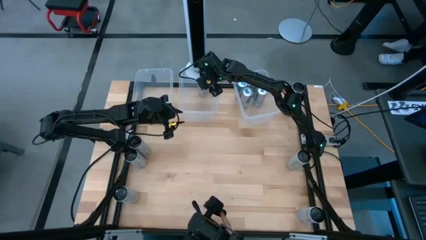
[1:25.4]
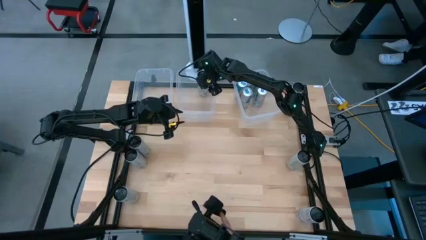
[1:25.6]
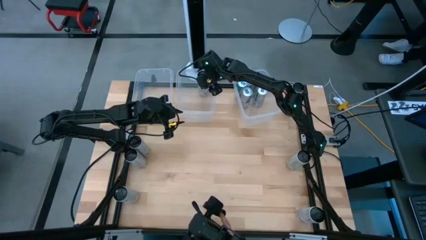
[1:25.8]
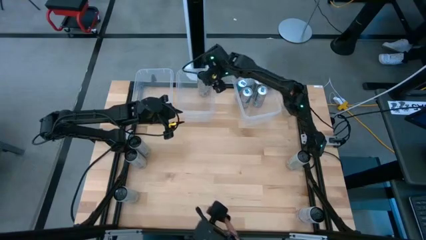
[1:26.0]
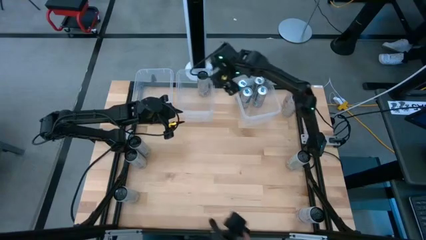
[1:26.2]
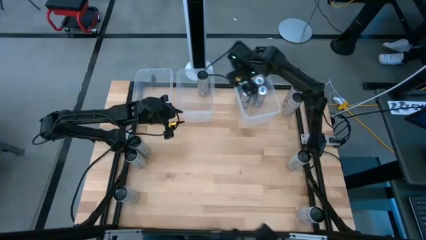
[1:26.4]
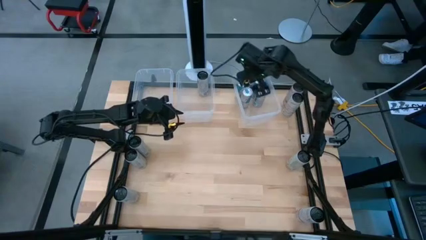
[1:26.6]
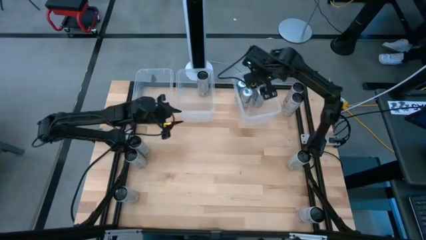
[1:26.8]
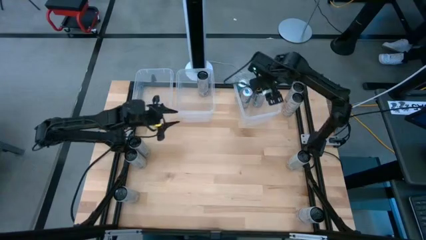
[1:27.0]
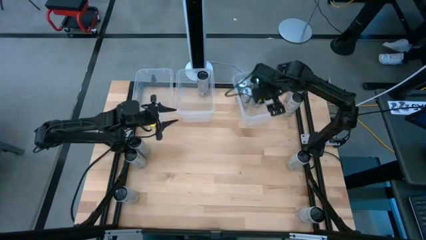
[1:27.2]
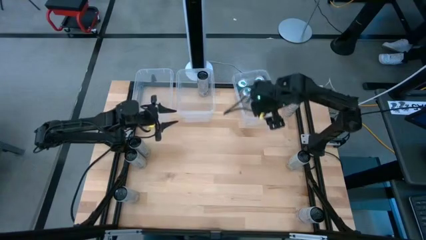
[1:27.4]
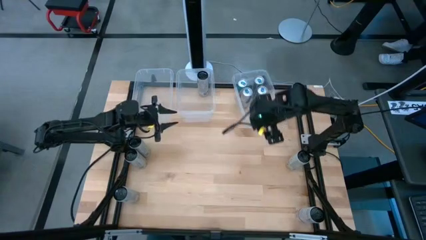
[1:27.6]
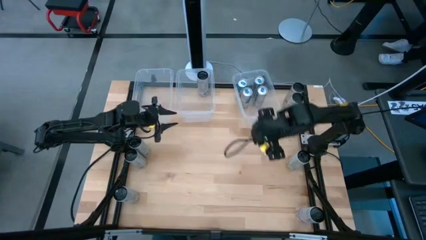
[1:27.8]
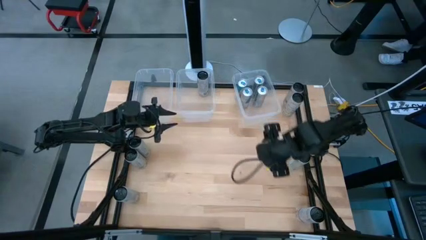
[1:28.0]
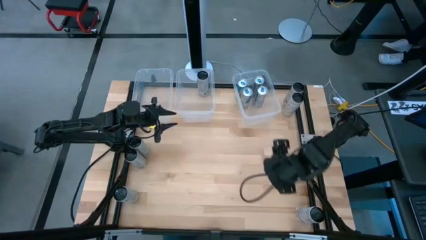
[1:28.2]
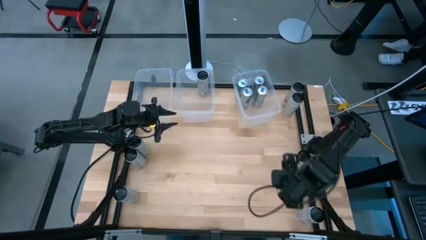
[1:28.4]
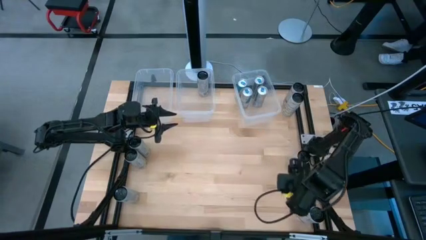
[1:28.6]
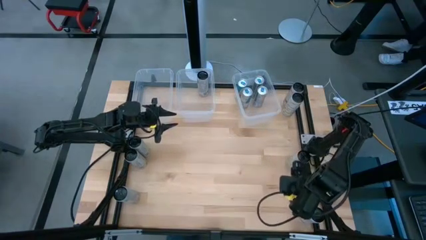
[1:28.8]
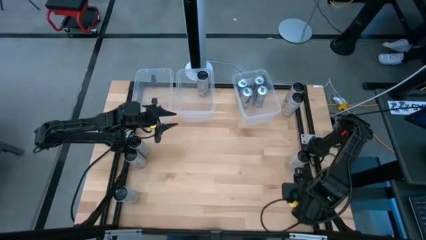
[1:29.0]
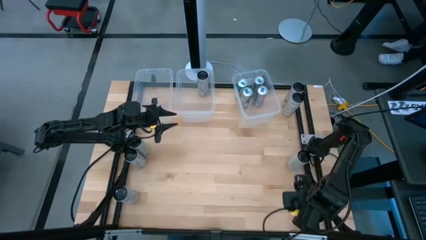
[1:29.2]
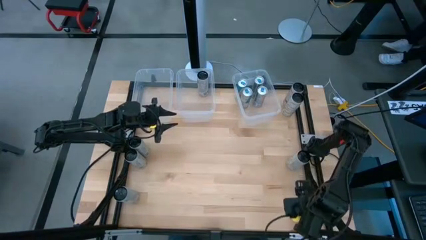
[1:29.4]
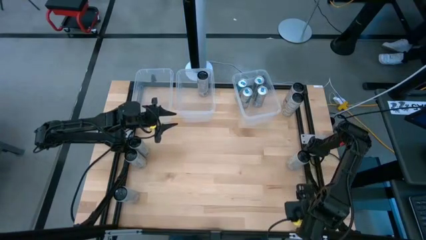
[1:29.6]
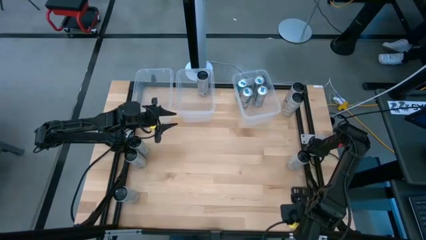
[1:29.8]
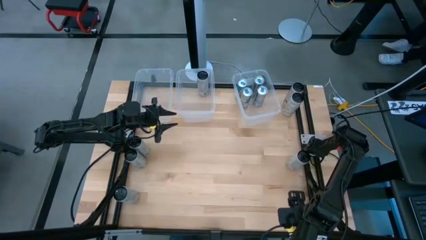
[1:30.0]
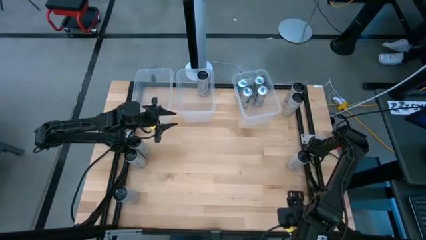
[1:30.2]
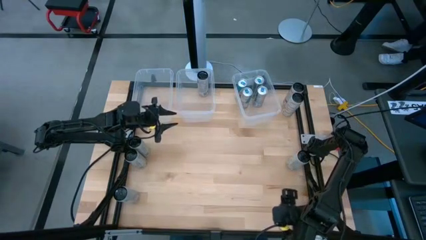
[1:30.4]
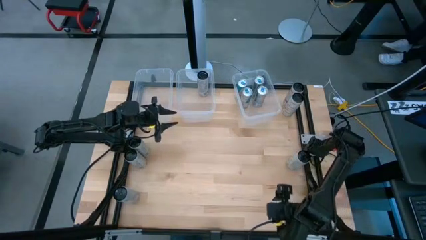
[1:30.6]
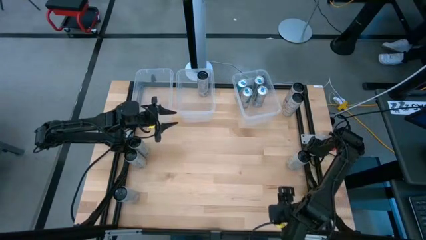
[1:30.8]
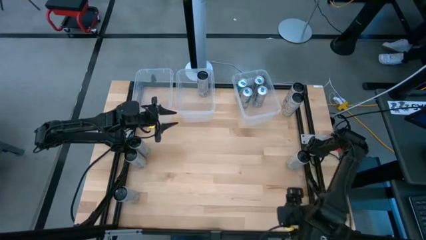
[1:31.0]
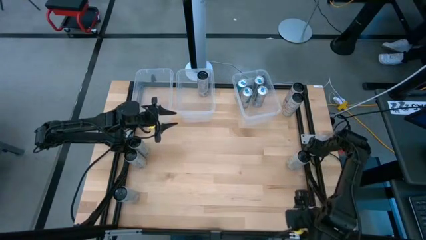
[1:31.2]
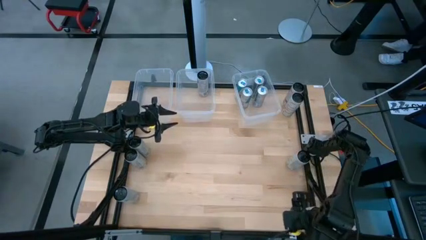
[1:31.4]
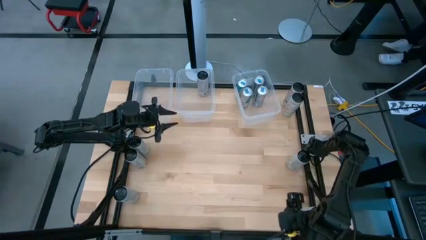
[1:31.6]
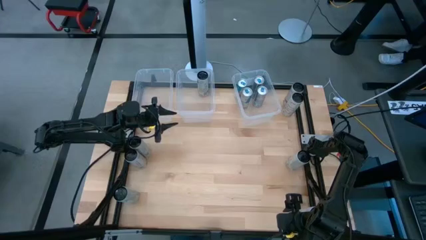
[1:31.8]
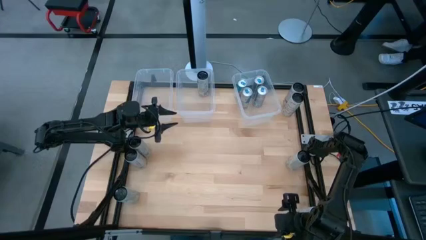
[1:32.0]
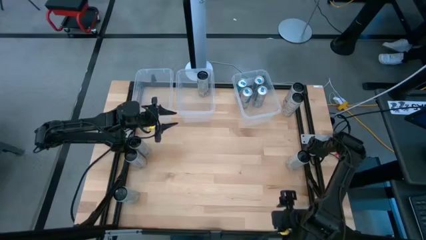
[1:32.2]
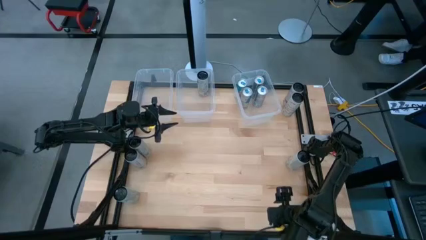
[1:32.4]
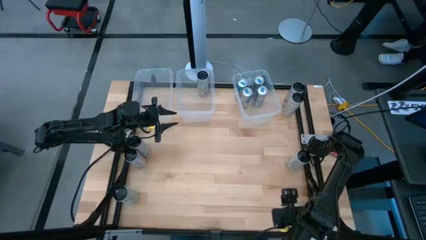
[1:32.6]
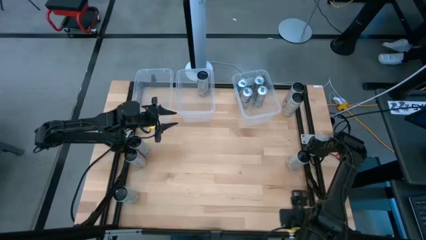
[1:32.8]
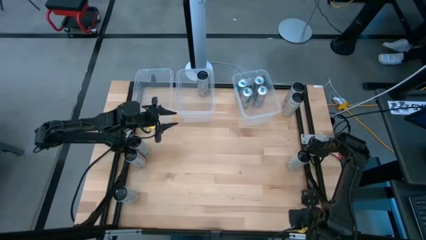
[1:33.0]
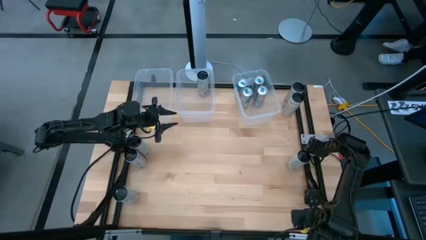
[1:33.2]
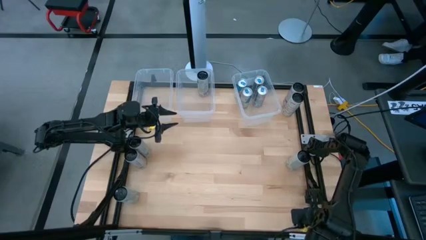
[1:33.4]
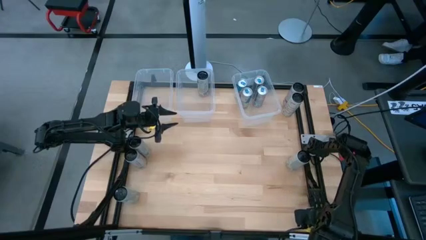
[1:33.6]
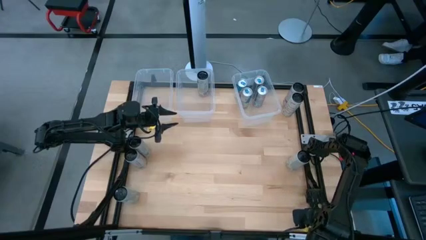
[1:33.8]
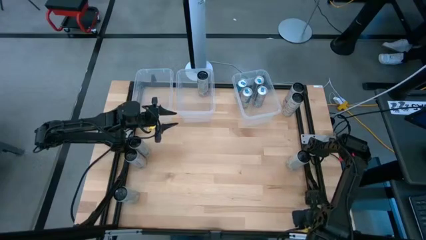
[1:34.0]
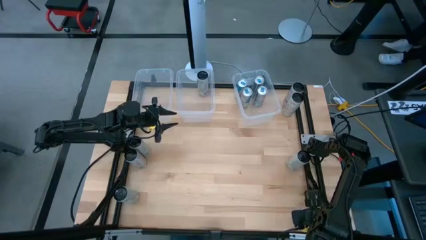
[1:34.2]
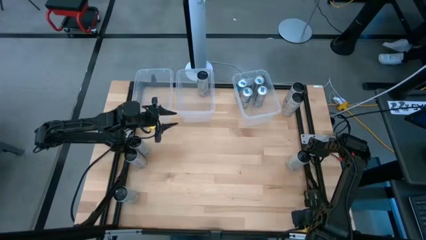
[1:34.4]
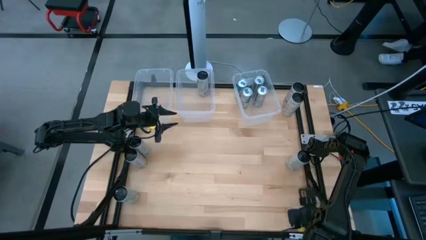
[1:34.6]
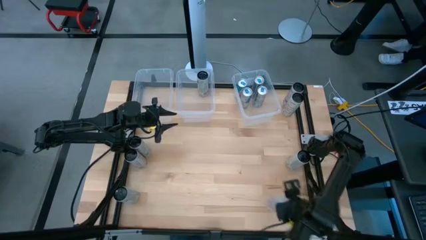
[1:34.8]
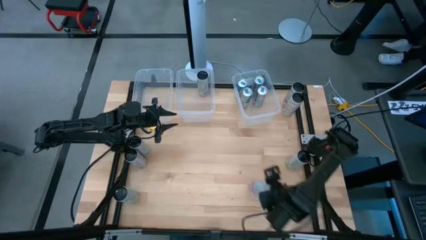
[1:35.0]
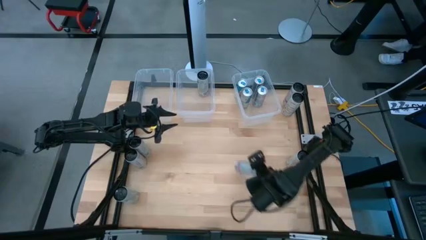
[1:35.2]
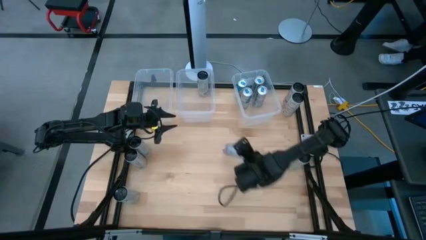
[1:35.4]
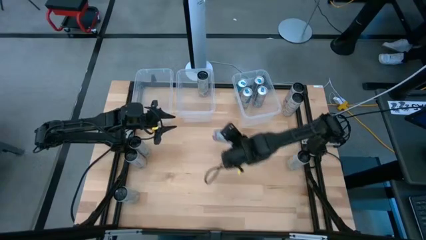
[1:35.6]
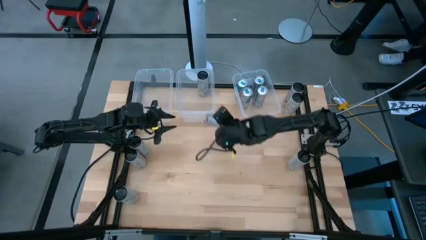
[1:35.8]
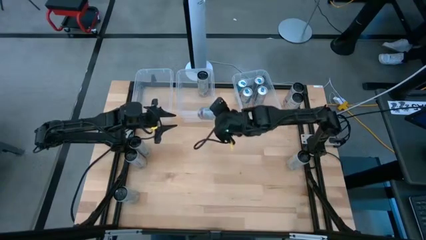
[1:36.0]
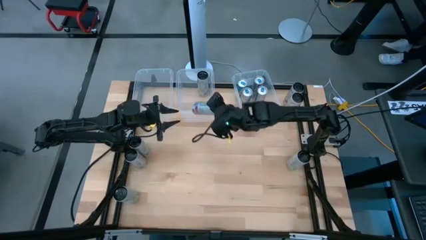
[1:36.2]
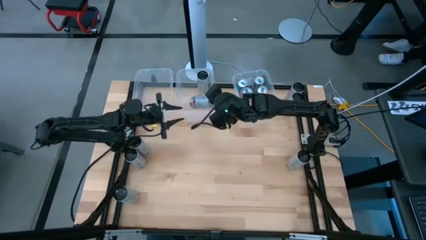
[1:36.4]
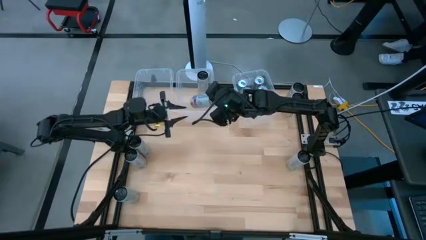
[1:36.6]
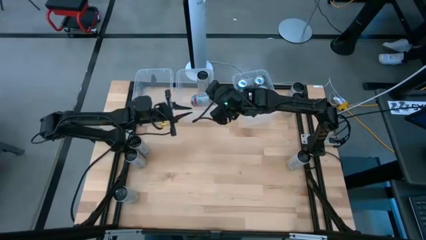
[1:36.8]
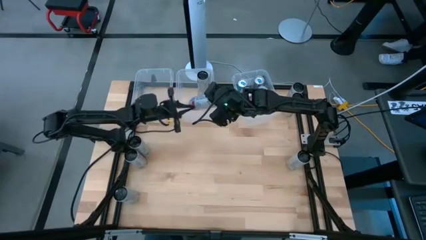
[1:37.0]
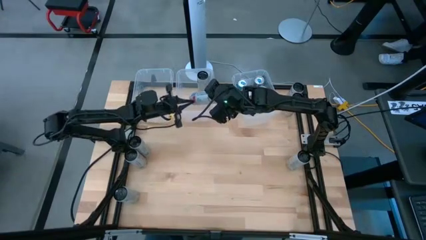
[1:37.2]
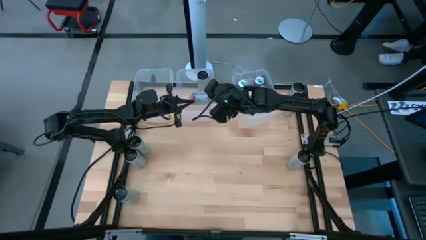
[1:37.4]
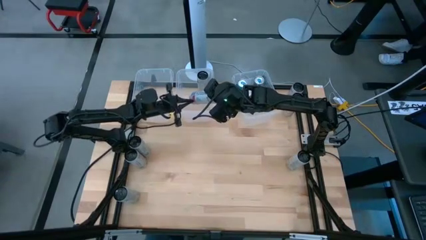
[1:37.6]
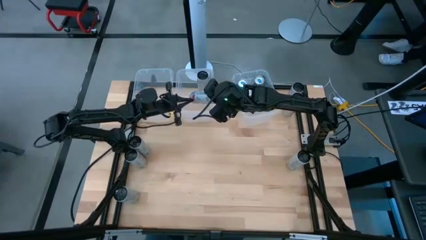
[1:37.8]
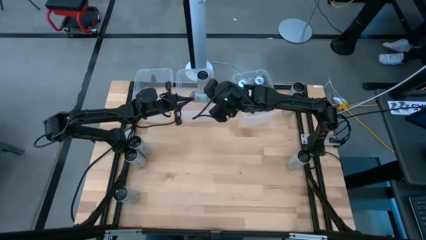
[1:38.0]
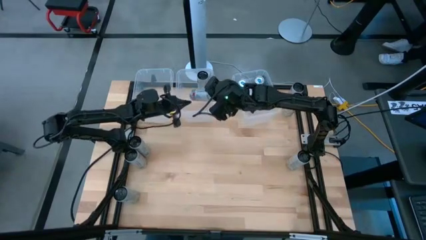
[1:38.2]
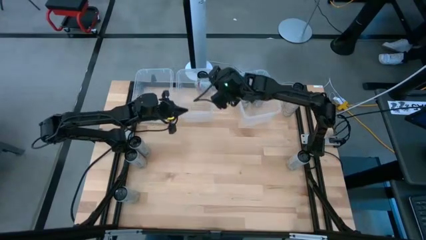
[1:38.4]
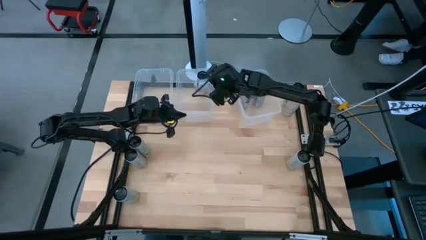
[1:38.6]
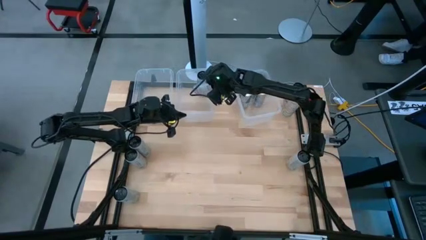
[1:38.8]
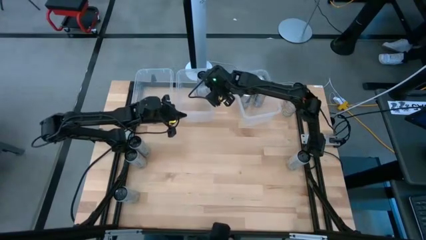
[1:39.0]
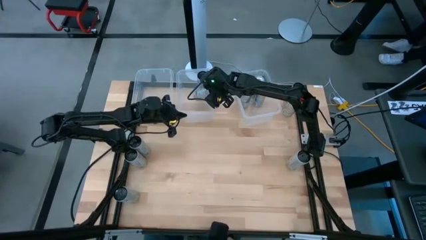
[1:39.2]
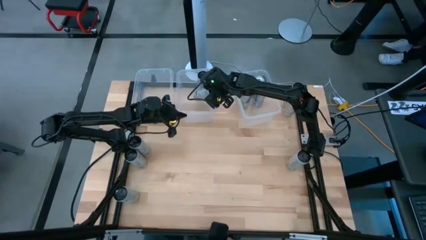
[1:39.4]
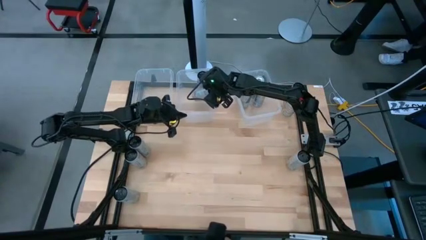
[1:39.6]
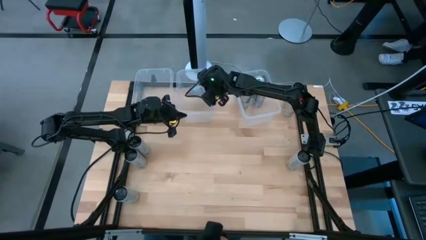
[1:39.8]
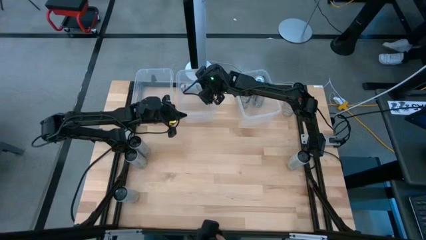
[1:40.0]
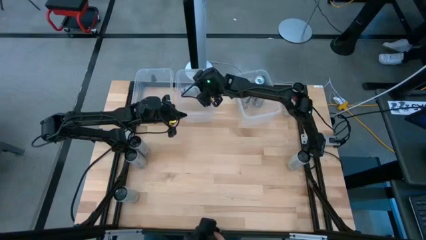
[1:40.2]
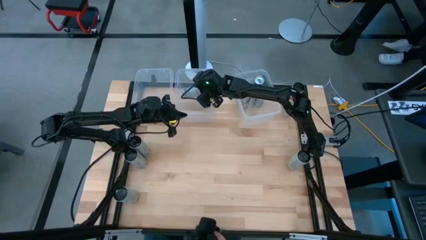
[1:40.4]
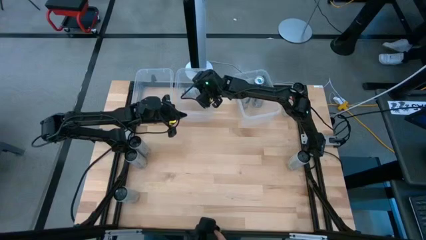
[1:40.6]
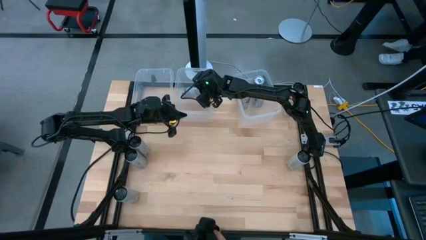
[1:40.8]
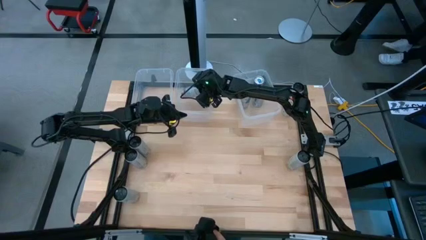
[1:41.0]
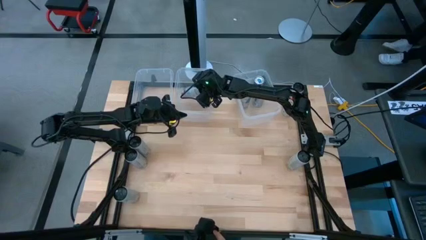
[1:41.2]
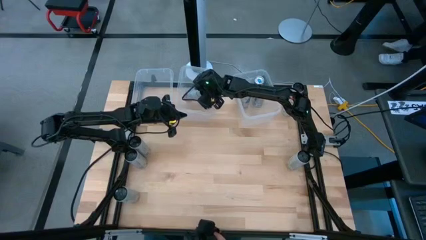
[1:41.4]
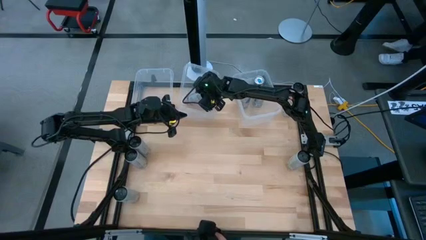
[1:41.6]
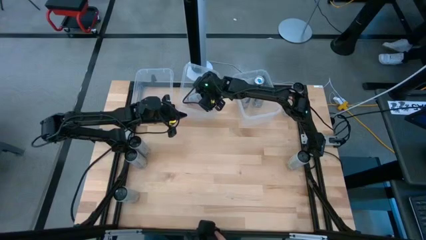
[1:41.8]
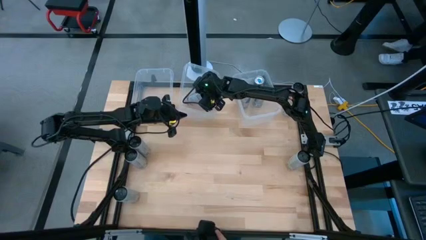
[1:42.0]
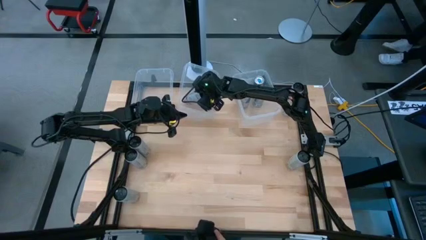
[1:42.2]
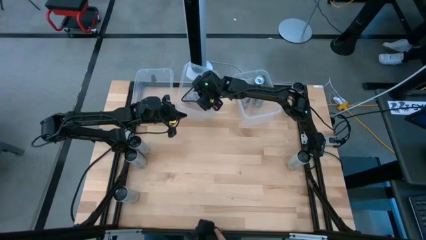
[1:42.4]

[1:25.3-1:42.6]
Task: Sort soda cans
Put the bottom right white-pink soda can into the top center transparent bin
